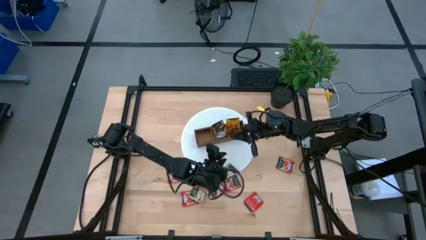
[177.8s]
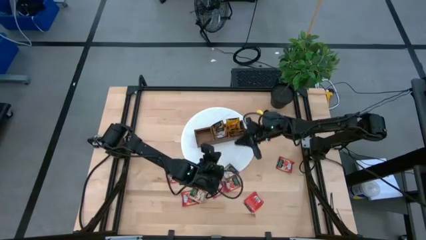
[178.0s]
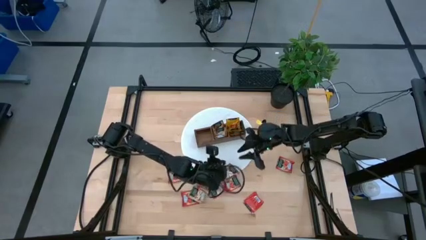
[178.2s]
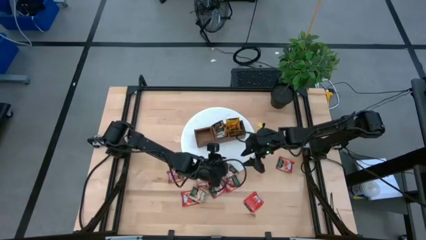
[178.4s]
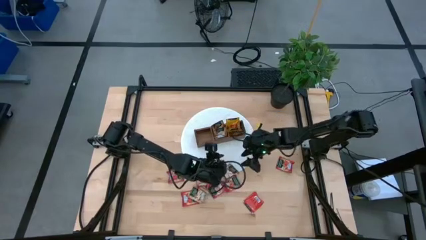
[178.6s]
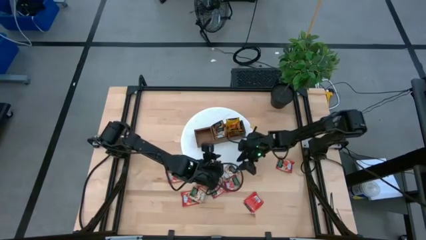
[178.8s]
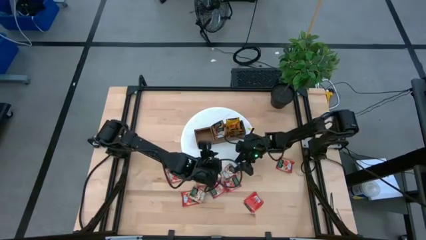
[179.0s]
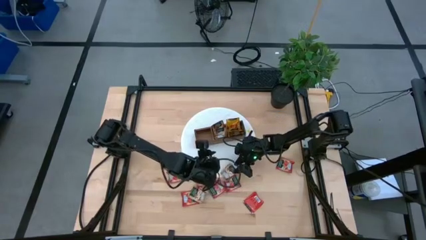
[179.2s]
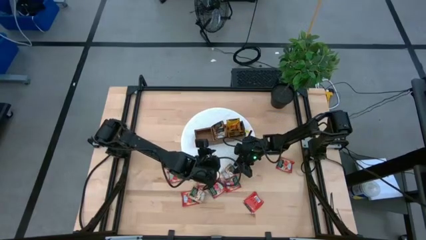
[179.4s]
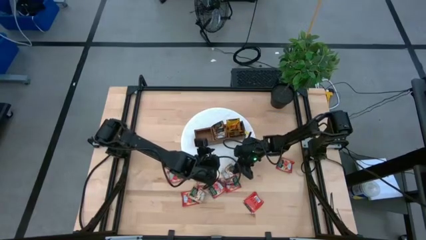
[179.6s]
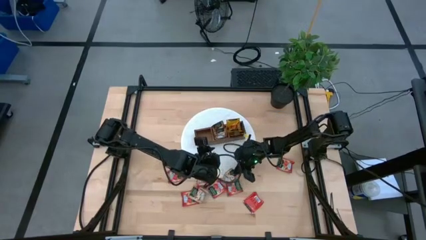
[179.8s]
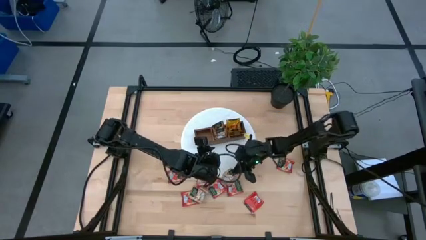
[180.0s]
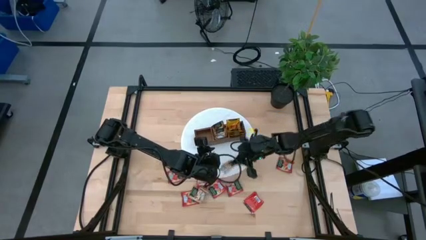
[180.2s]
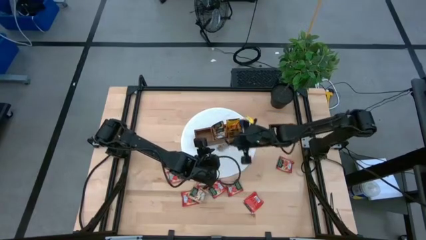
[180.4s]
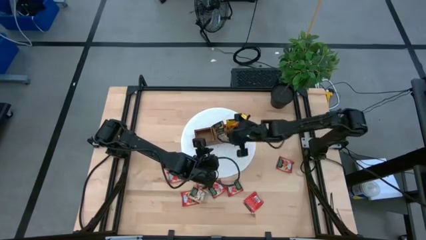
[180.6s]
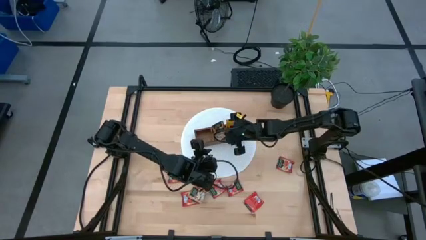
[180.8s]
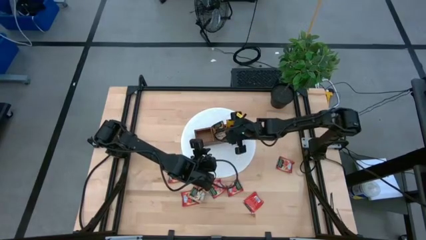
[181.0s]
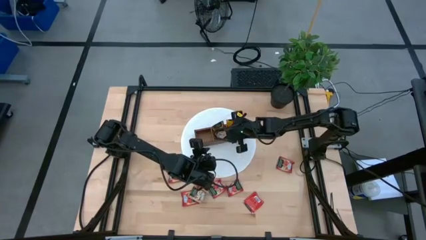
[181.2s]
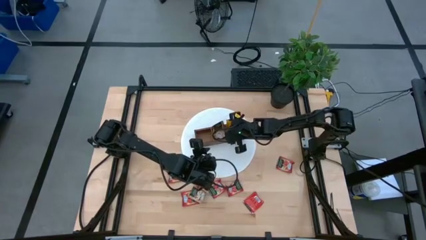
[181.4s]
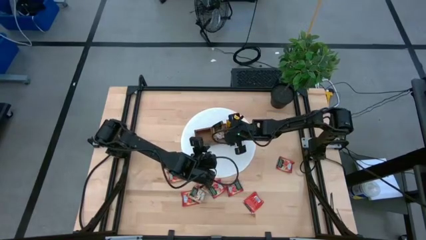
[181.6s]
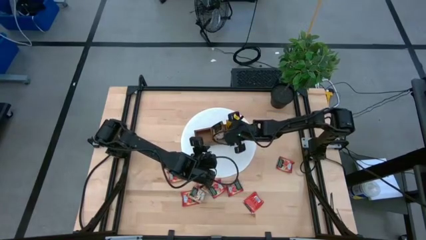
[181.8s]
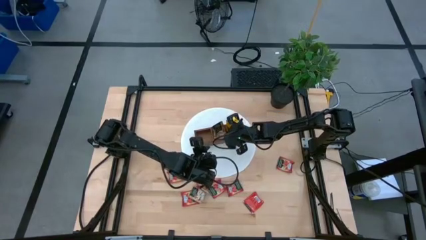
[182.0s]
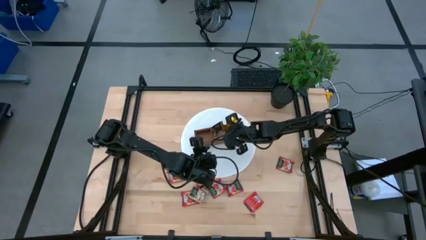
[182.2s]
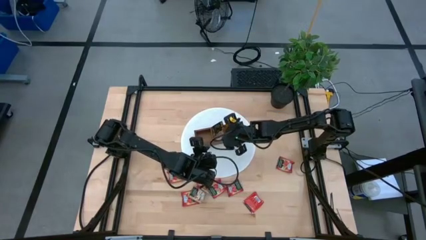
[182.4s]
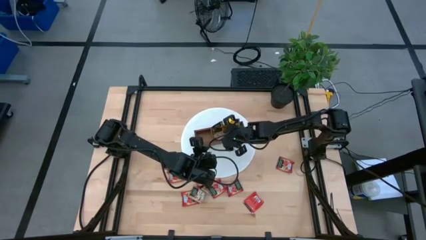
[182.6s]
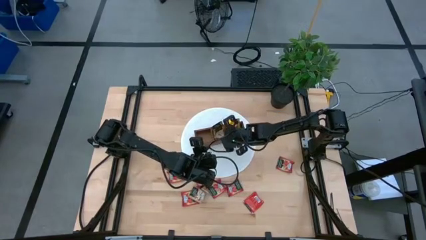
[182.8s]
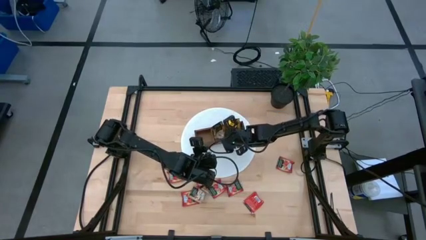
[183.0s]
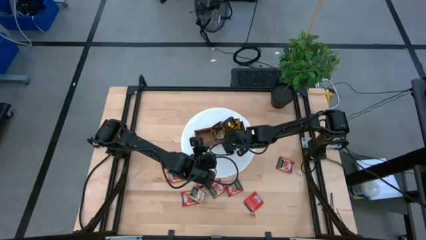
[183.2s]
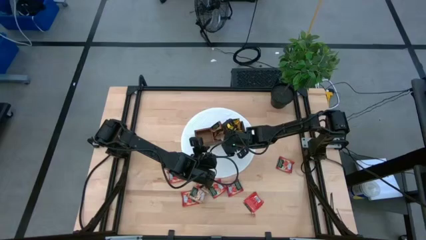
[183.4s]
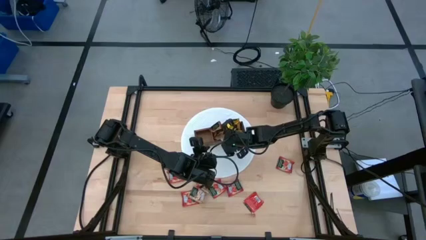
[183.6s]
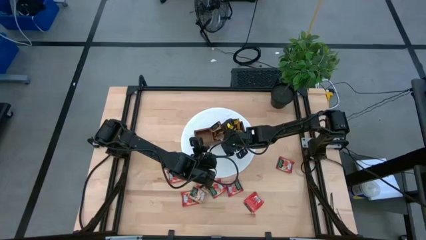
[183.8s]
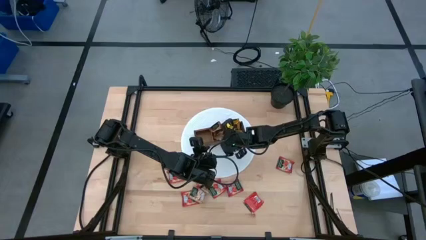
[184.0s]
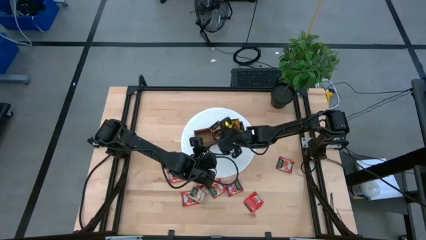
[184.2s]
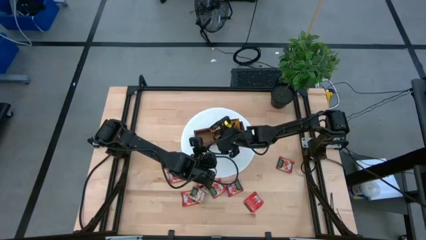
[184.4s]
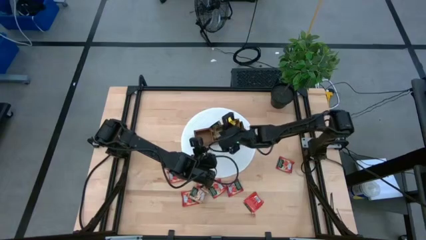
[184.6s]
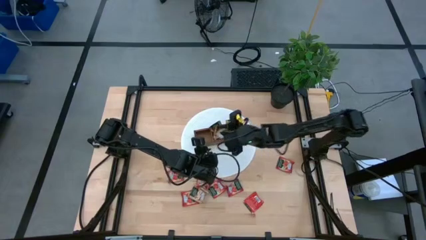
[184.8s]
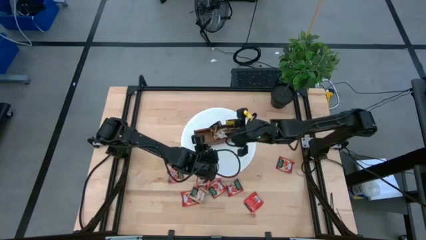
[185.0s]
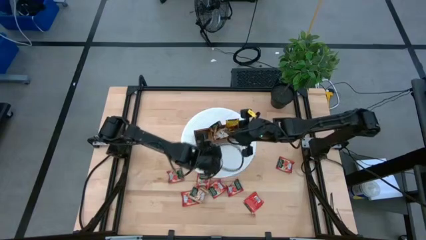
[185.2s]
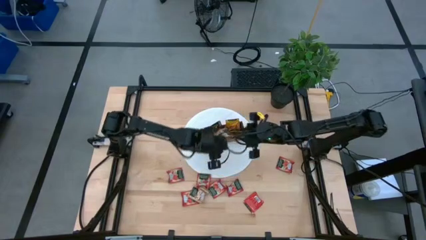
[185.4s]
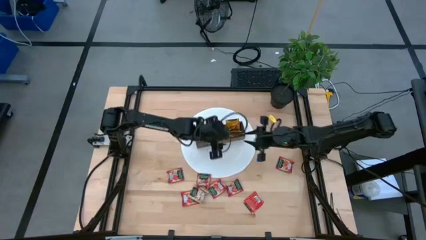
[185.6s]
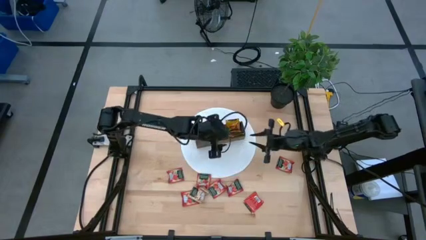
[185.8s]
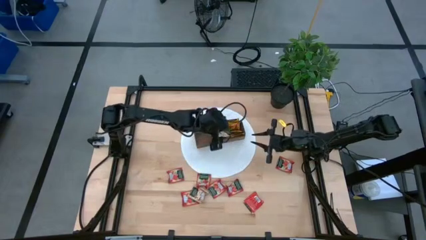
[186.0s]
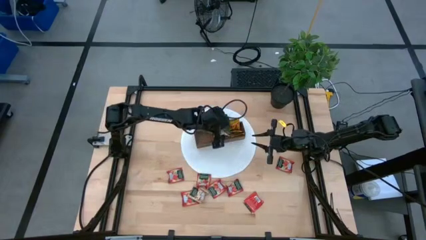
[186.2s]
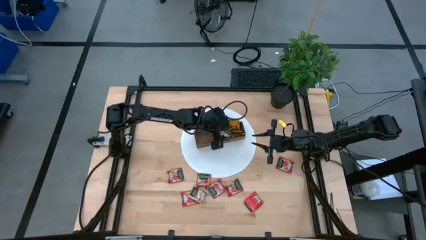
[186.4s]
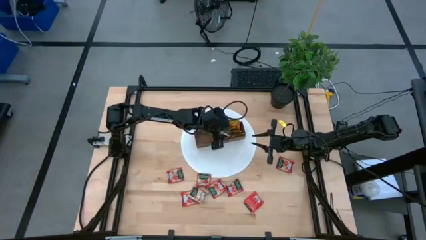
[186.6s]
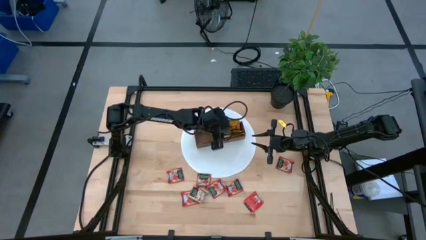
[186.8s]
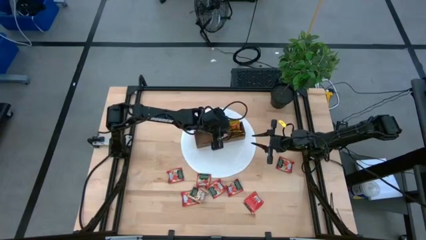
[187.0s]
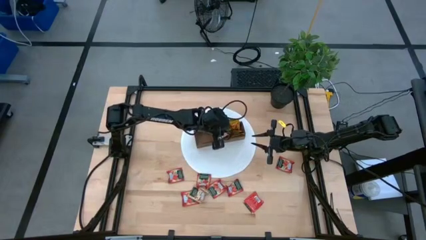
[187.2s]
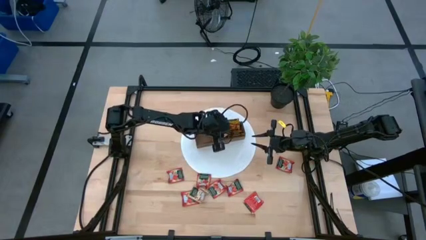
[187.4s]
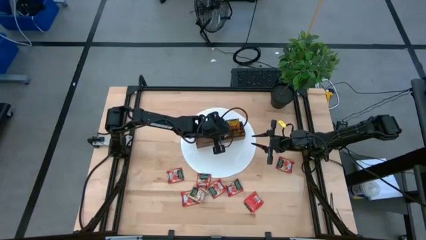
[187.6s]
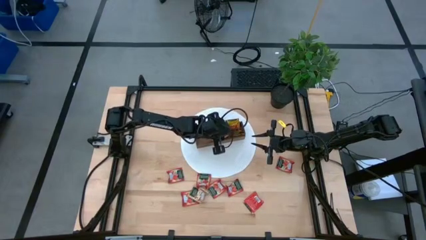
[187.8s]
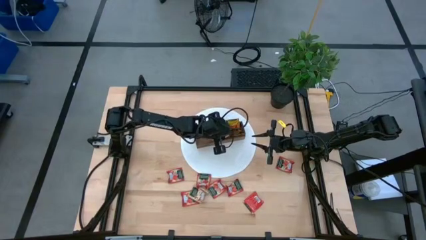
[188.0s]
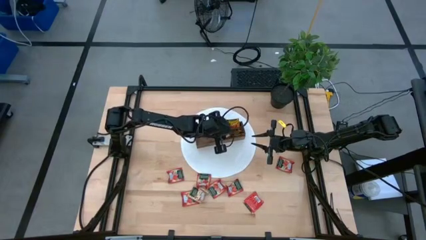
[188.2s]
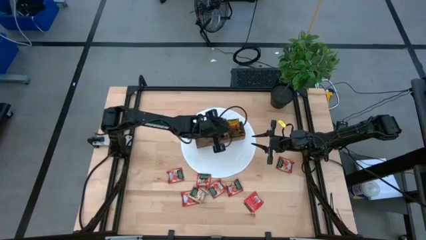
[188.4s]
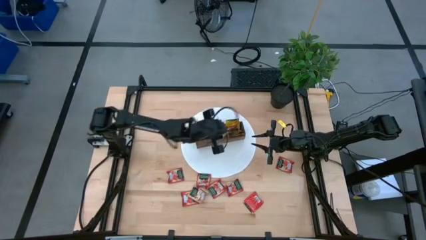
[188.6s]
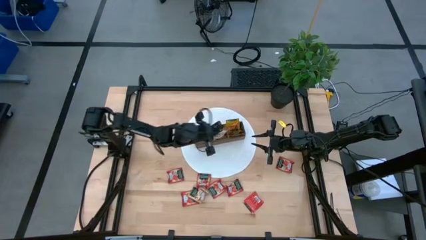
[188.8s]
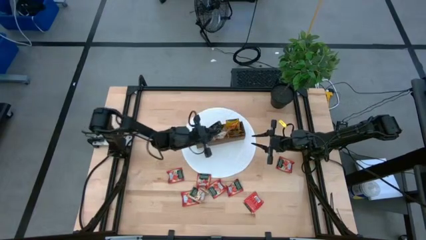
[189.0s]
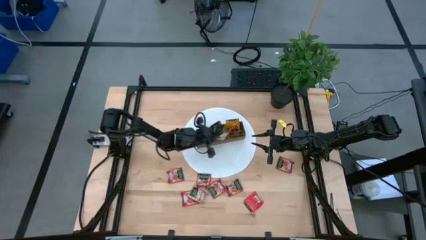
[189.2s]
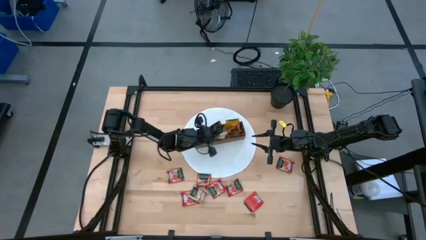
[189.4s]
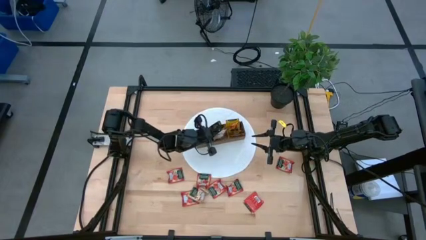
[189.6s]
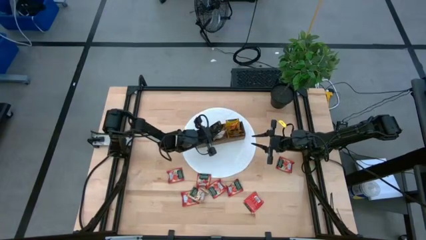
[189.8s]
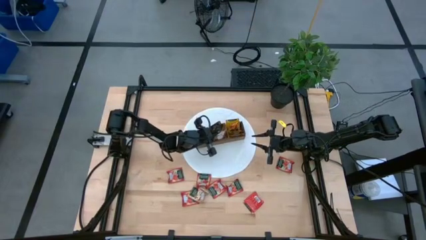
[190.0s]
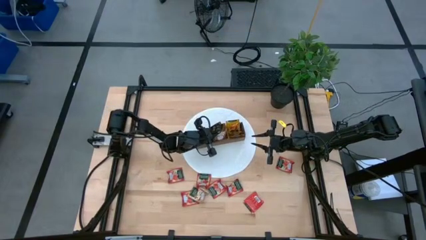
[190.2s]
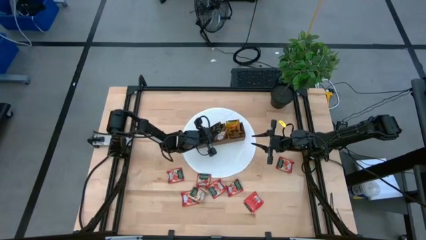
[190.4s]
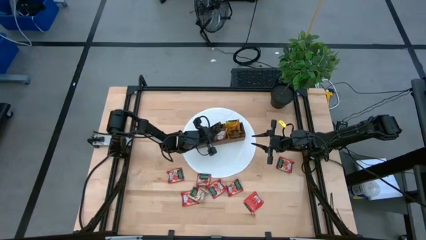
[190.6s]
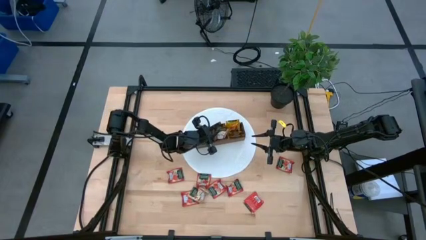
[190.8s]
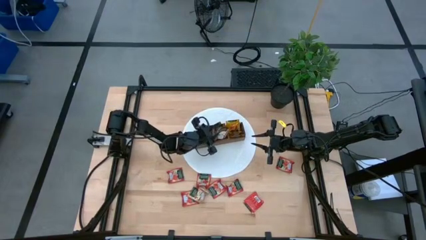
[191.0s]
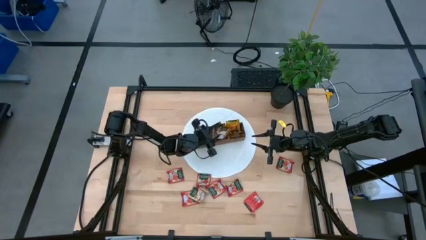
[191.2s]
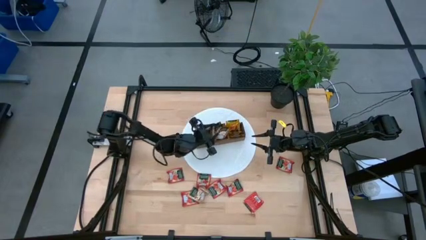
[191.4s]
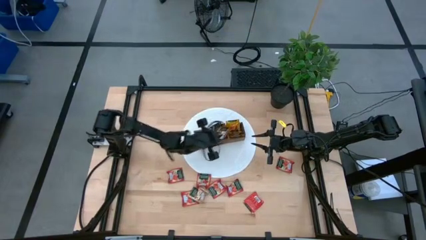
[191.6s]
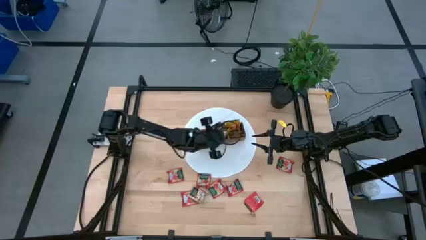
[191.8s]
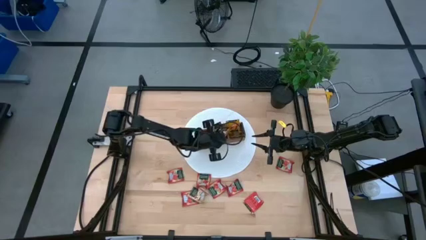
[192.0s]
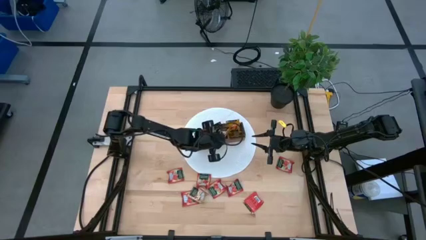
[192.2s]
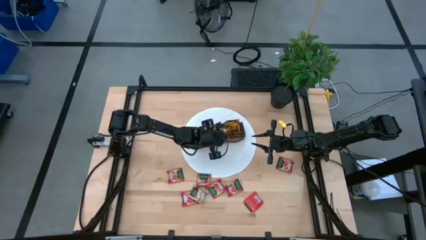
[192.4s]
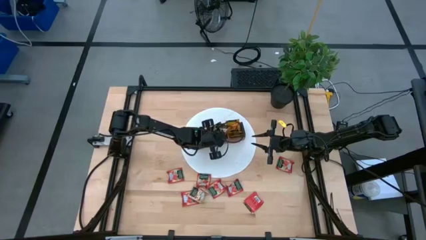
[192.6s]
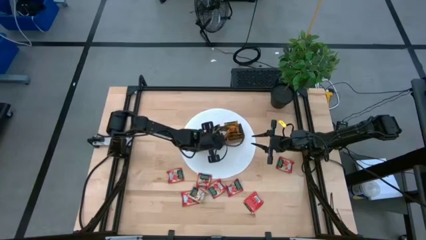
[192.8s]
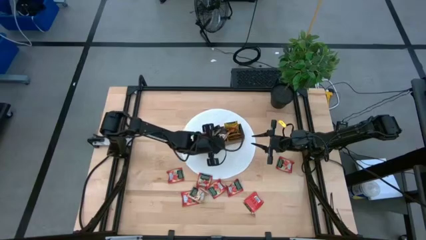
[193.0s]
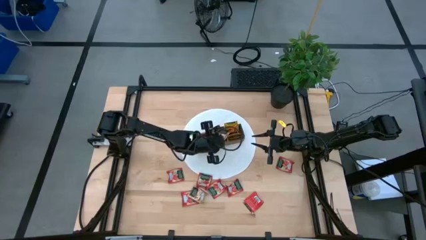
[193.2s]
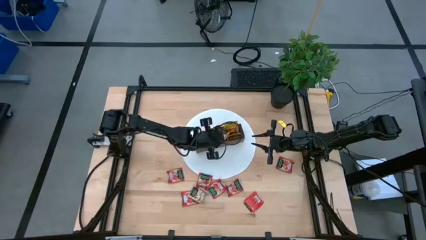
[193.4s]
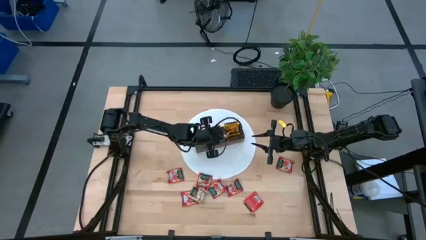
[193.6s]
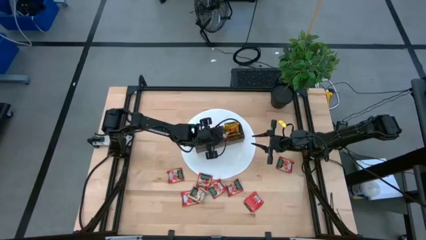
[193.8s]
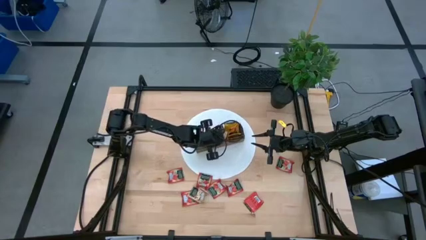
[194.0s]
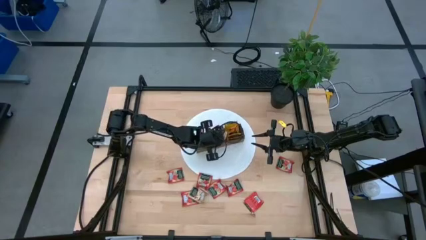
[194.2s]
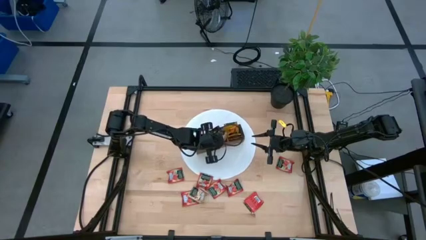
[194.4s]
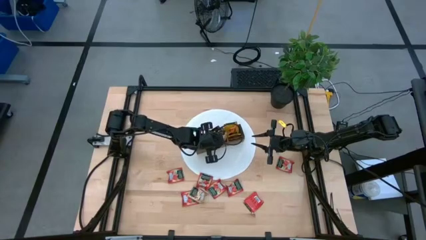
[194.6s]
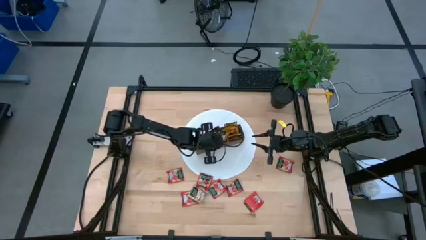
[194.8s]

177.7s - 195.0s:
Task: Pick & Place Tea
Put the brown tea bag into the middle section of the wooden organizer
